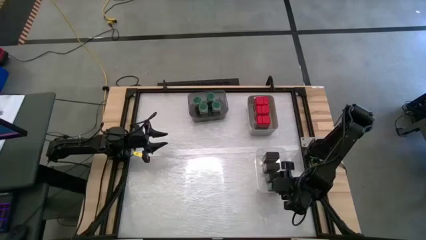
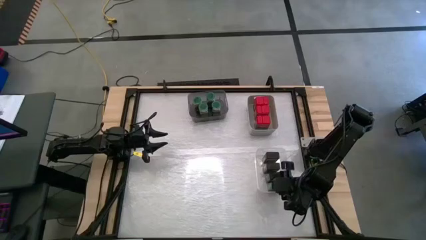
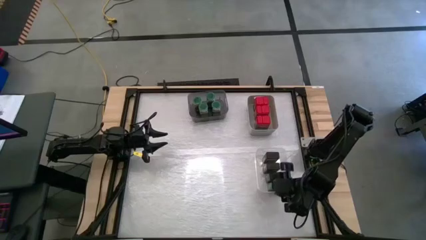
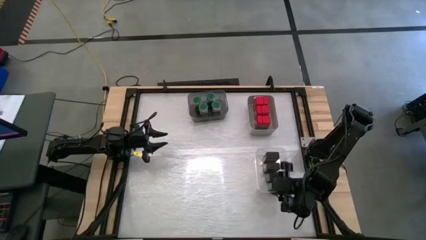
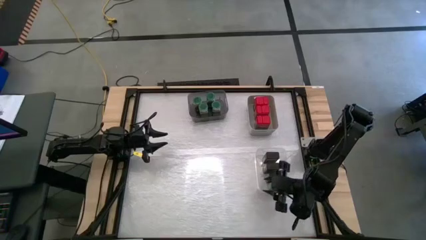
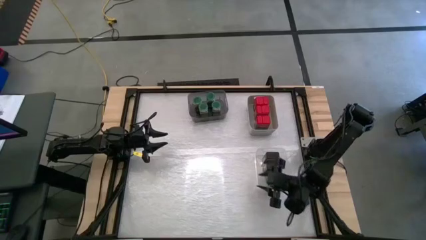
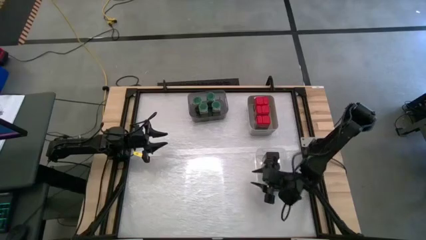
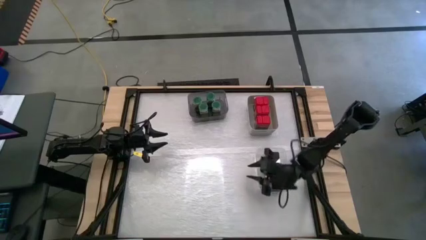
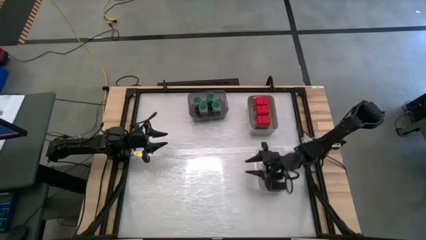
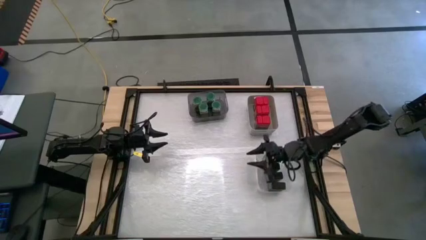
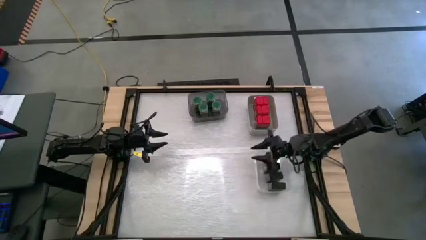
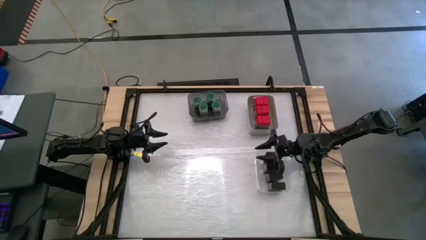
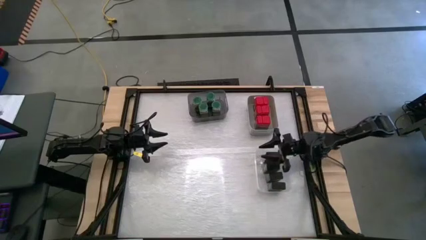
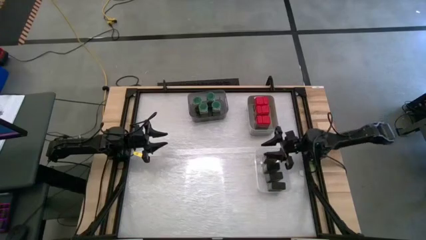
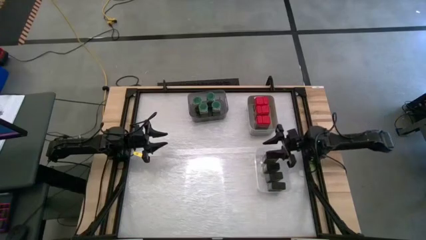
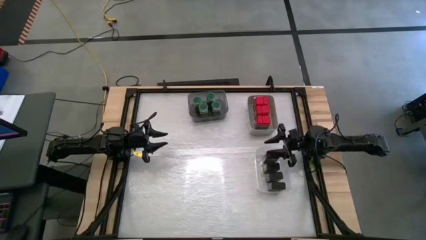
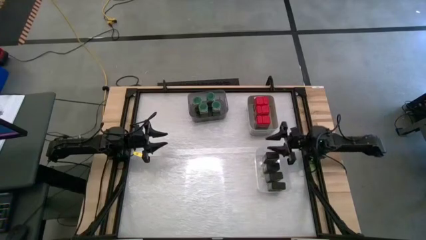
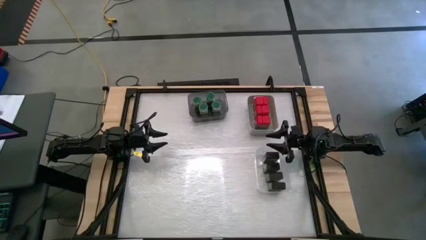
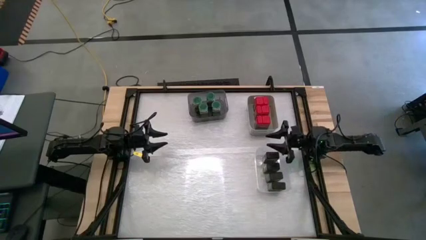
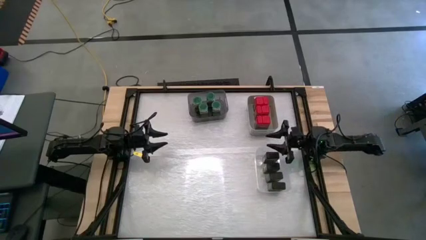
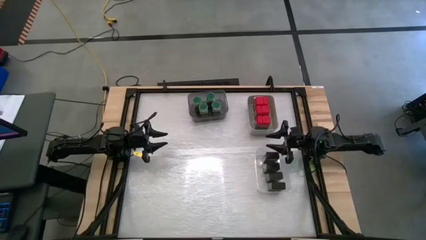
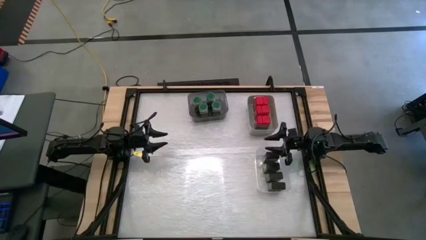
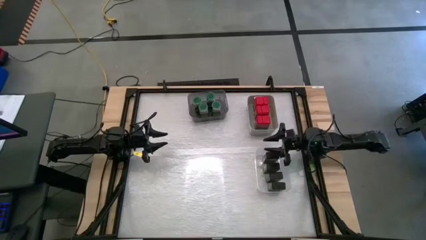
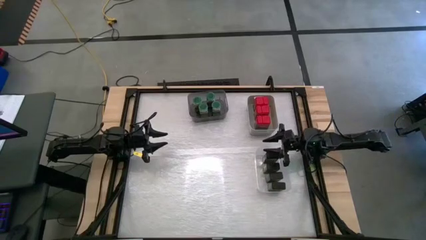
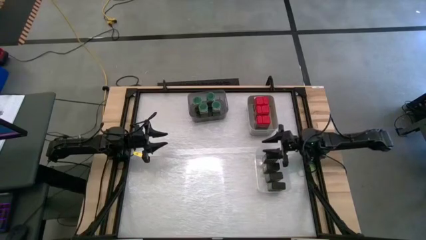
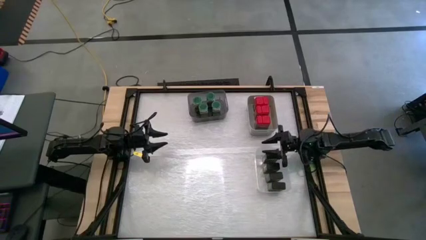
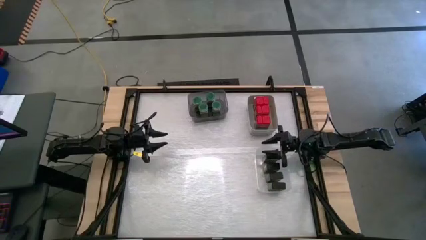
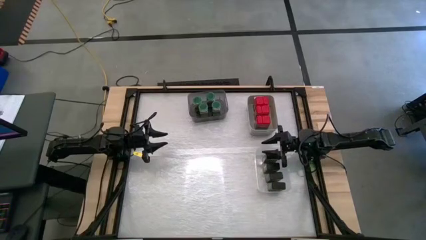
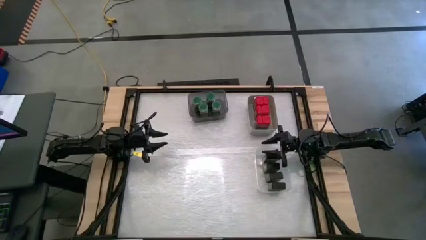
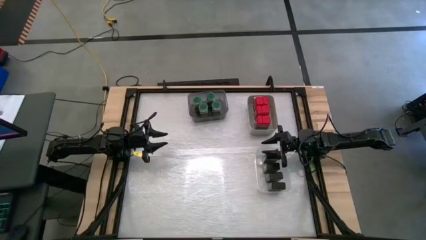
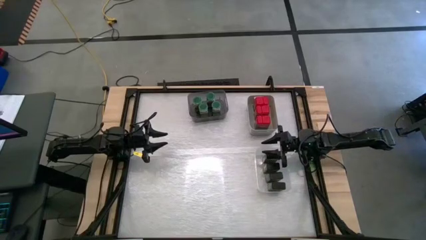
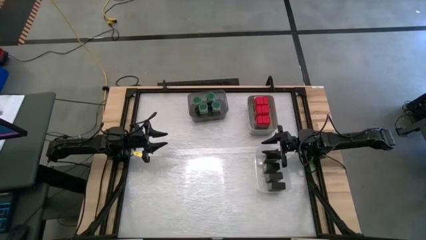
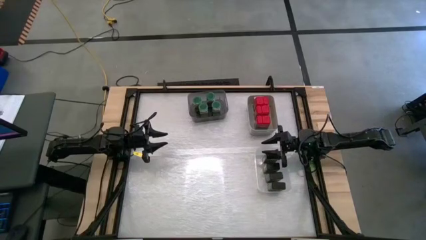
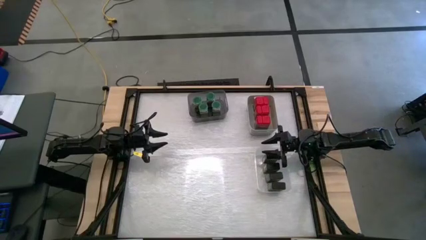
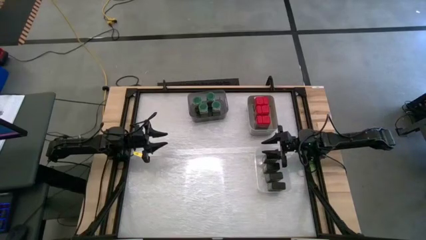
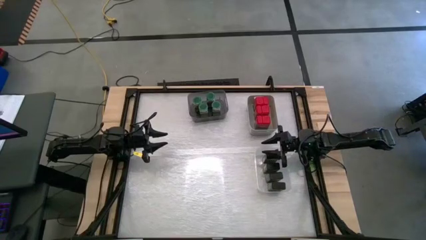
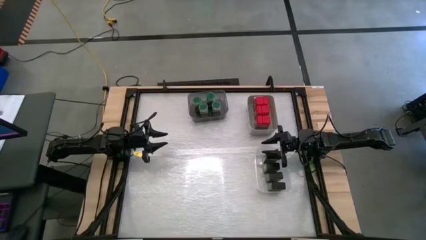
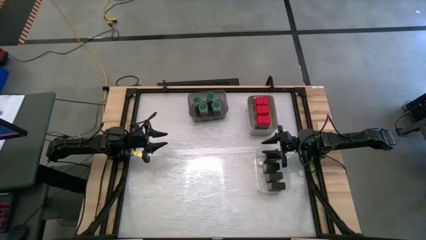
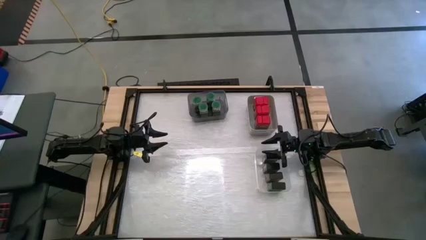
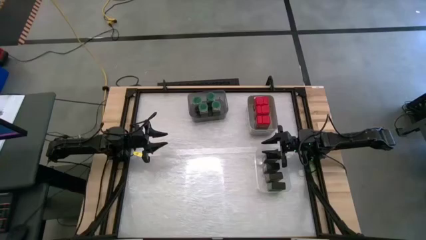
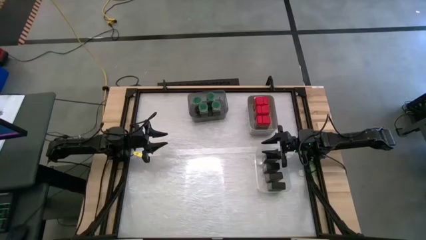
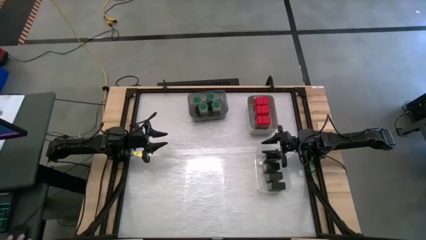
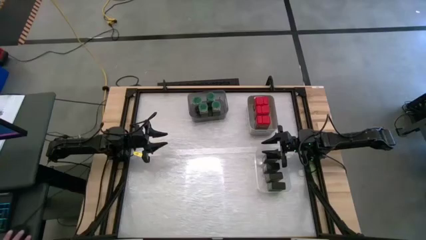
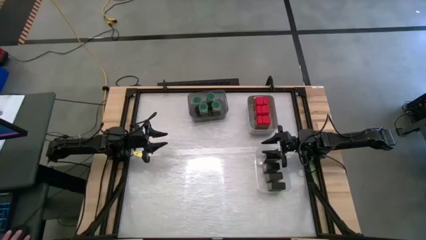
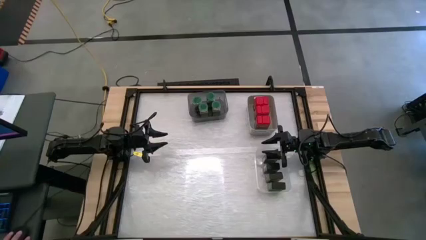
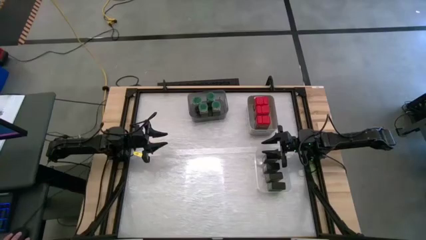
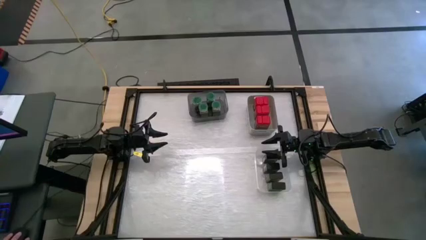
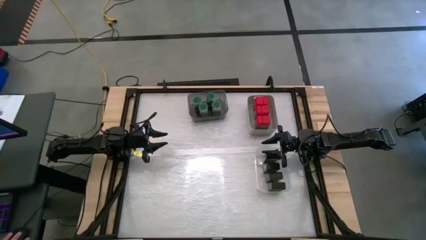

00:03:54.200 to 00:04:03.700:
Task: Sort spices by type
Return to Home position
